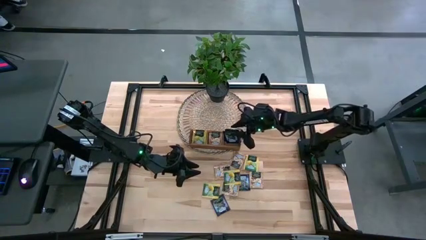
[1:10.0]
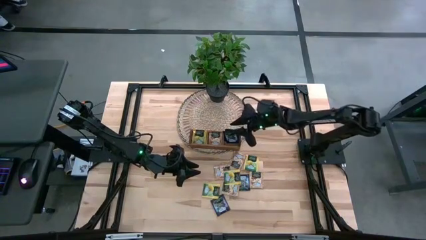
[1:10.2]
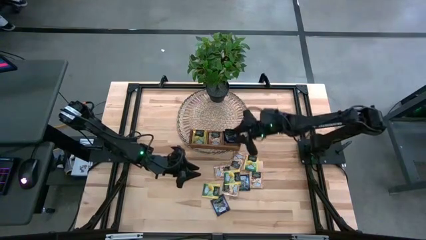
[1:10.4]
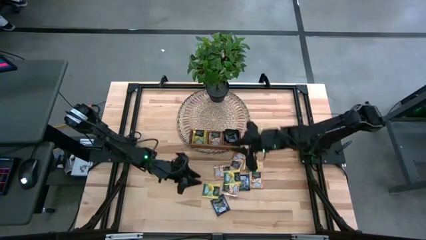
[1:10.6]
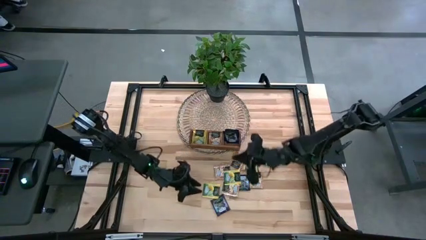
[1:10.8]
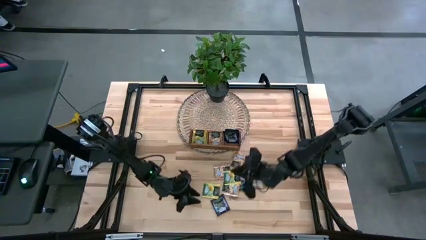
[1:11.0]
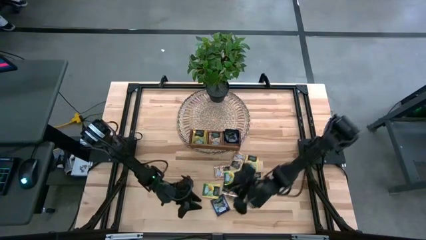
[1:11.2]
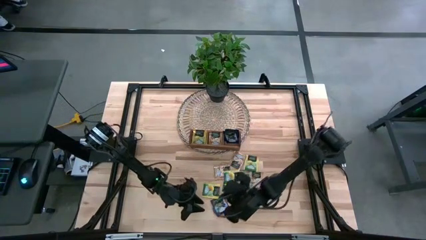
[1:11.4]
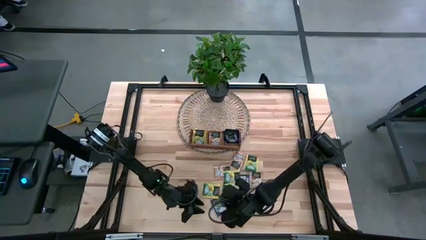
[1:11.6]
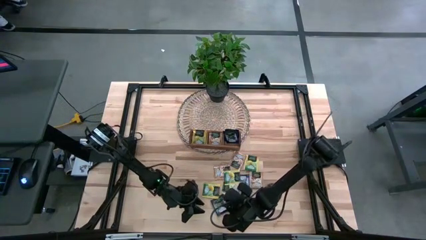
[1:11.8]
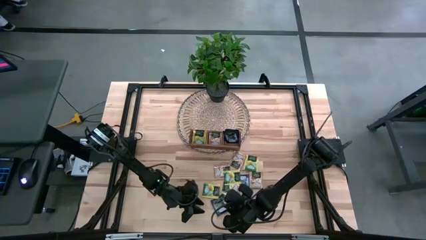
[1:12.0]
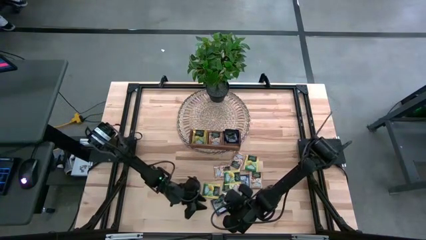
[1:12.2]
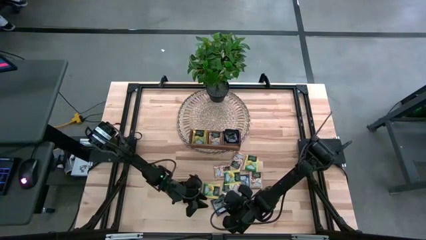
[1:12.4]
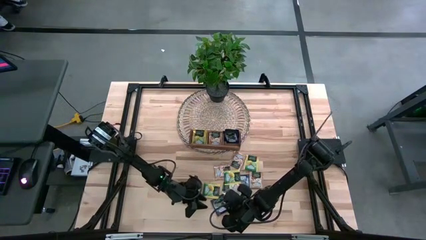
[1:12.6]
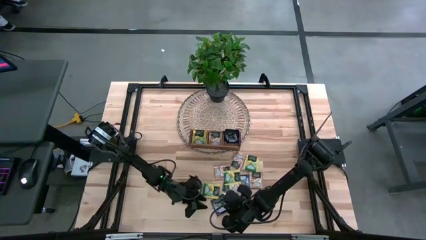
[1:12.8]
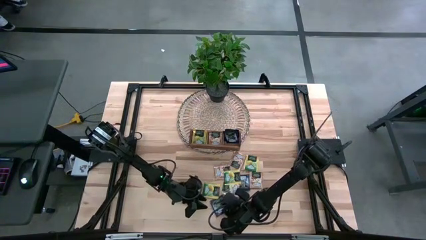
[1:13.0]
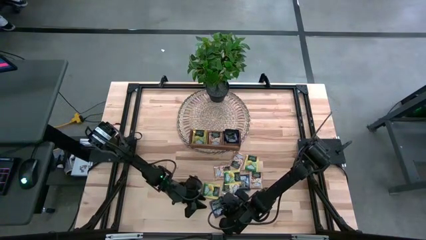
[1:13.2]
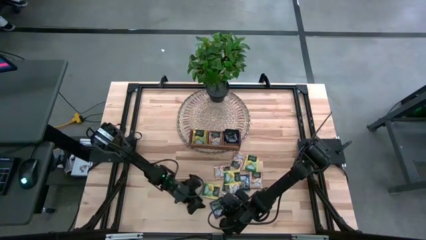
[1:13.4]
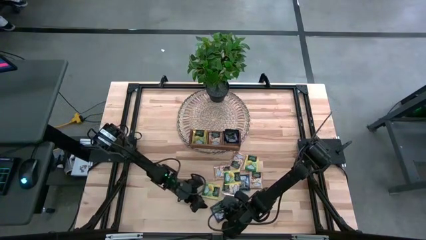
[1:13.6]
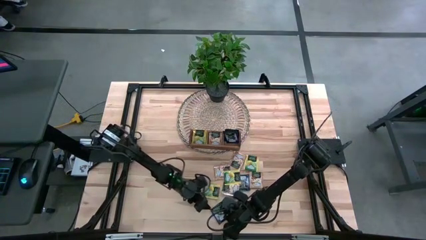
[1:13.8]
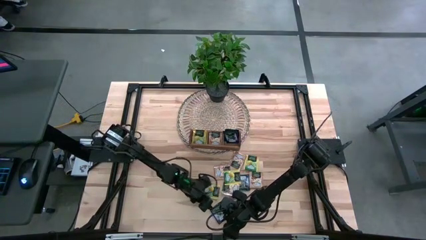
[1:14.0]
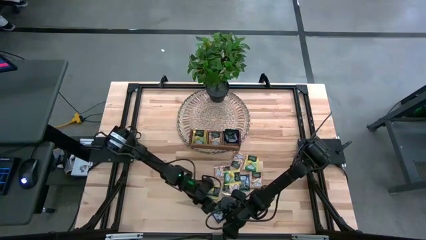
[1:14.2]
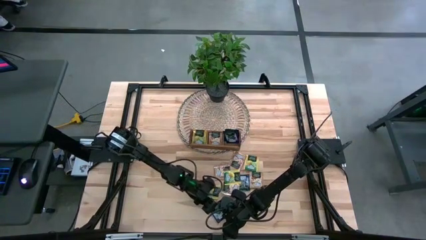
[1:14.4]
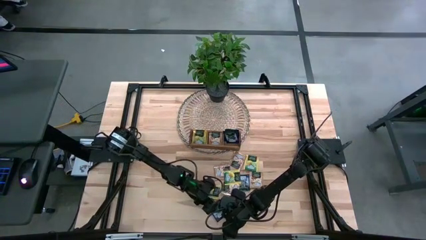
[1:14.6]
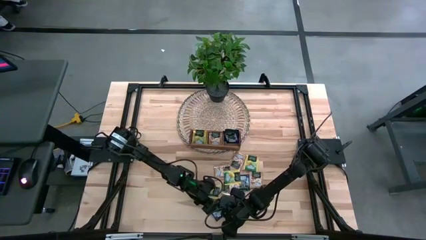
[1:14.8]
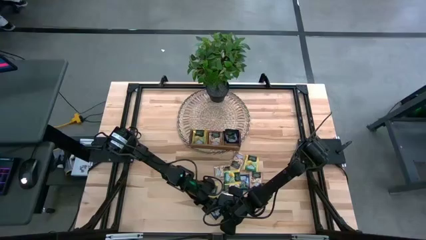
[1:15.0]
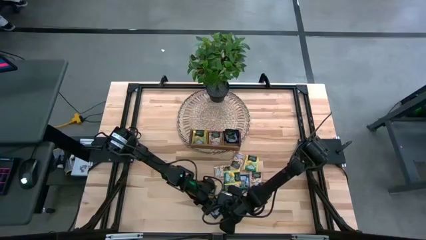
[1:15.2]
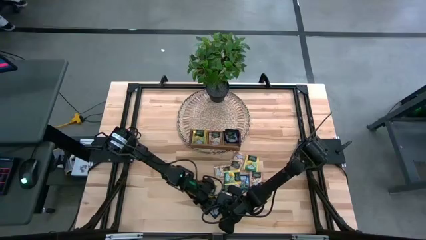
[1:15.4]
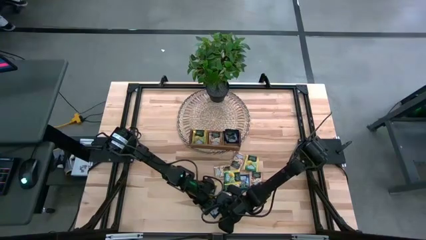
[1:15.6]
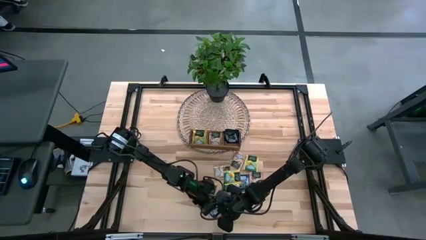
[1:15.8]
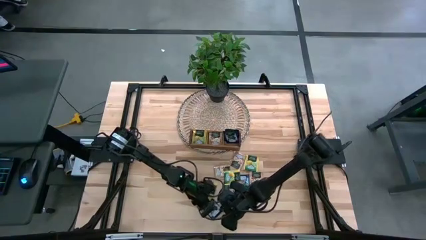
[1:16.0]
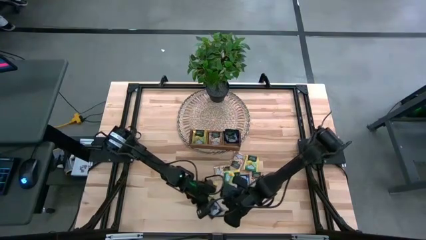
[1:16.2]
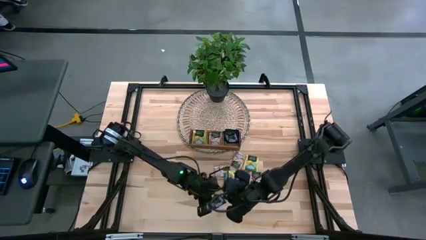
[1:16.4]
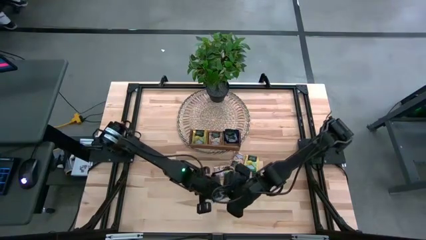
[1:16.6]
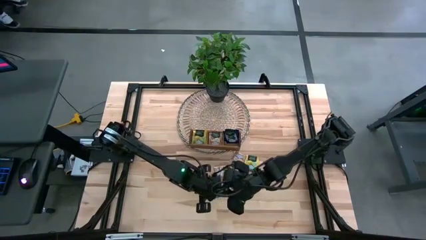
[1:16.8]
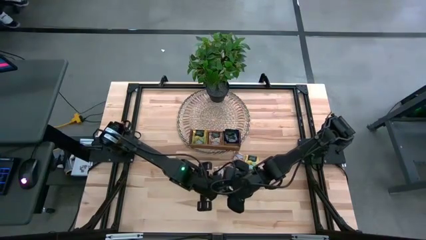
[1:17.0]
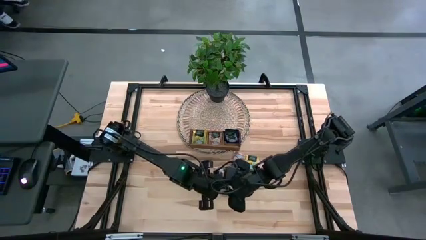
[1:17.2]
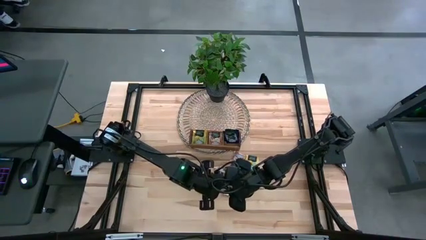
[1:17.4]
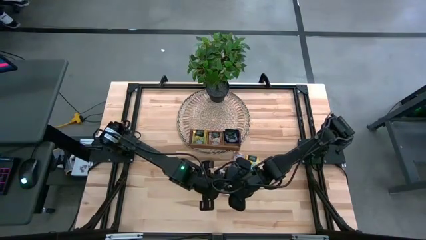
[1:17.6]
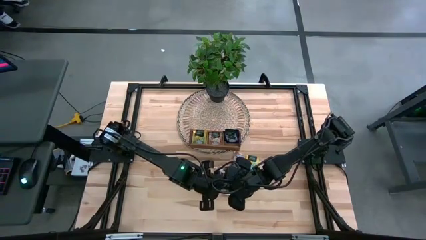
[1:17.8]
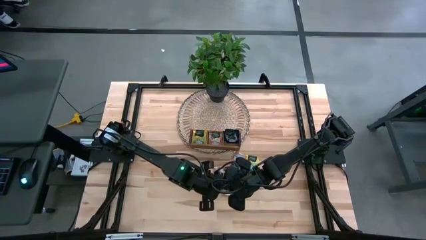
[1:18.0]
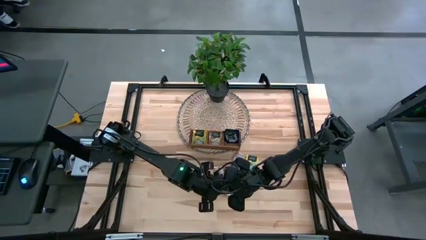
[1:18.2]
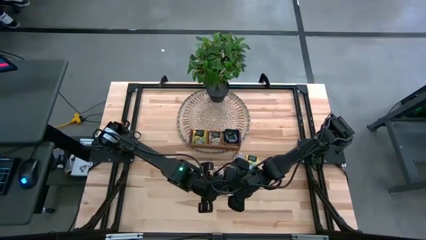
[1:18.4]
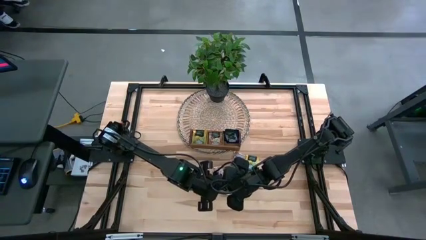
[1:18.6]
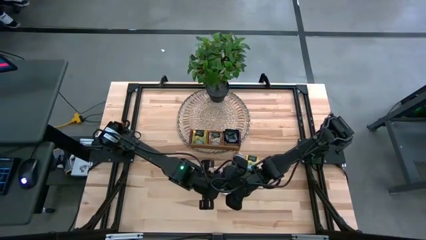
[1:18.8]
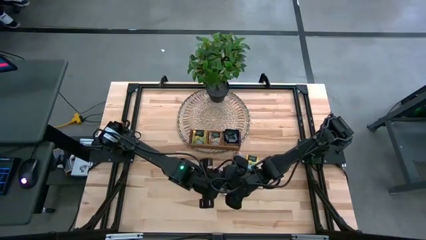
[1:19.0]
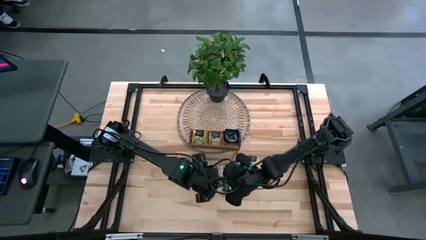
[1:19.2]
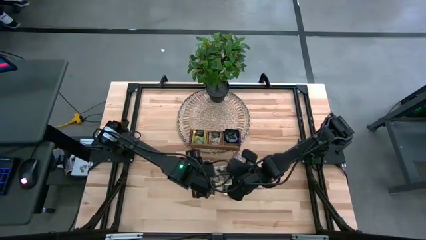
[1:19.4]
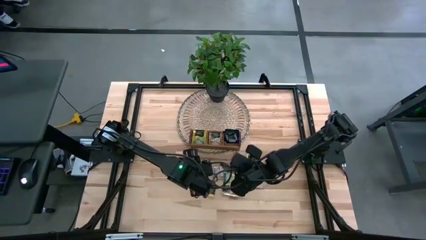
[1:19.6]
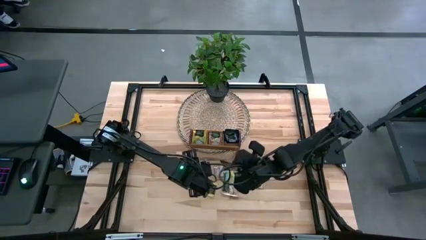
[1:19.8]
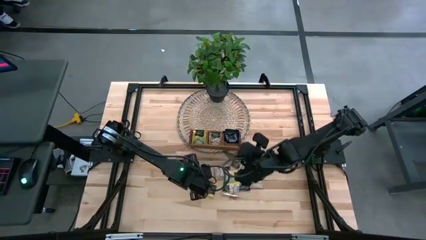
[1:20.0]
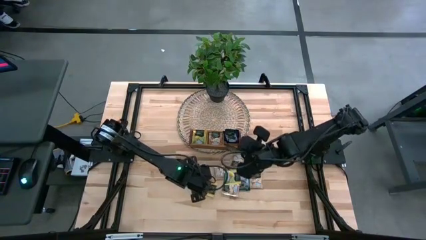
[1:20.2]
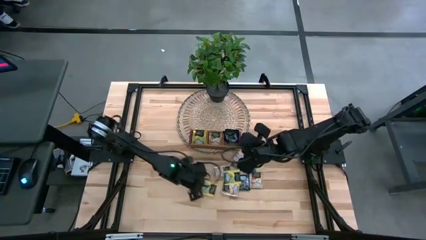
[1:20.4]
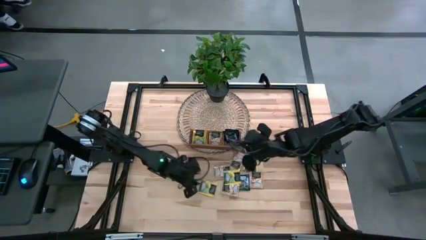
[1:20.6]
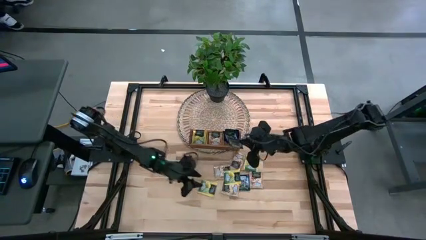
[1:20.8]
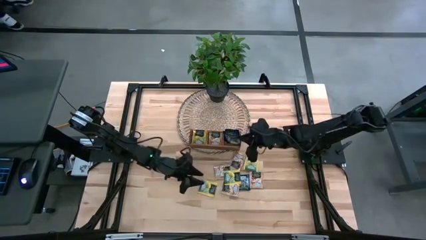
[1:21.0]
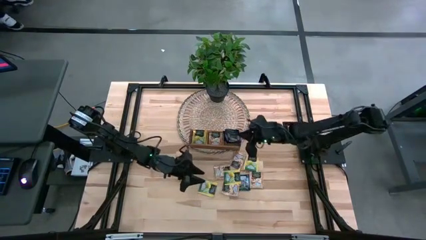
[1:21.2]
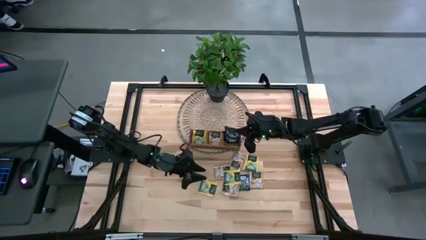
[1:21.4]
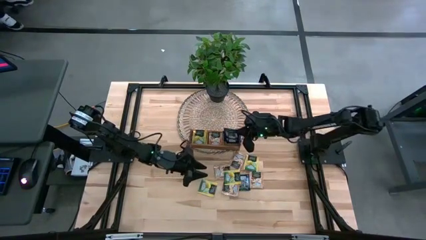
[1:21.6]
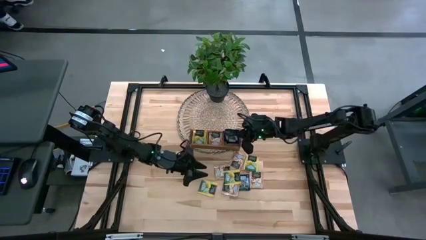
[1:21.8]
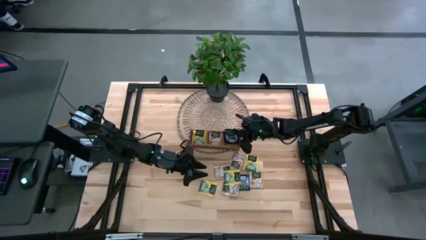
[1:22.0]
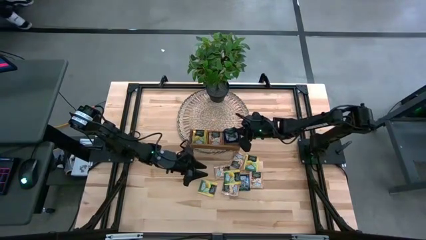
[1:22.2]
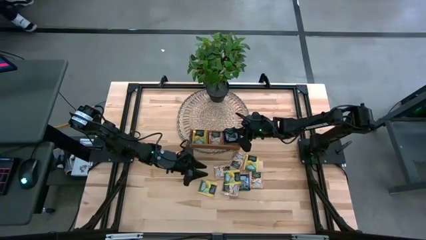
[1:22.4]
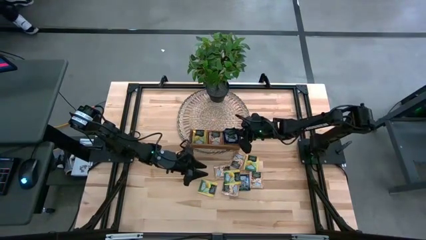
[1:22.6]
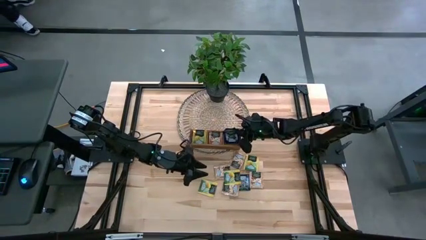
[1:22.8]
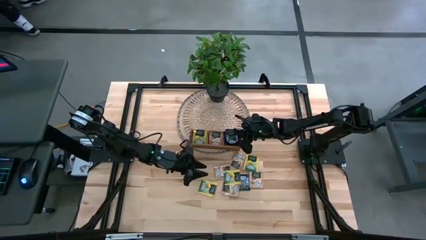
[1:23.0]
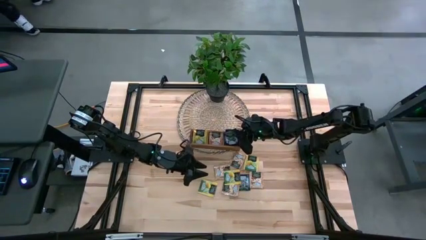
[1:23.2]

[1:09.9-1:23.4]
Task: Pick & Place Tea
Put the violet tea bag into the right section of the wooden organizer

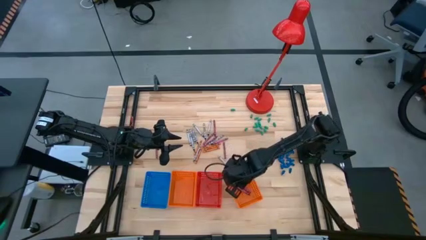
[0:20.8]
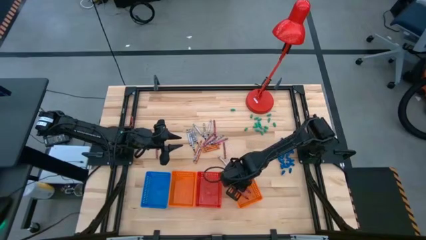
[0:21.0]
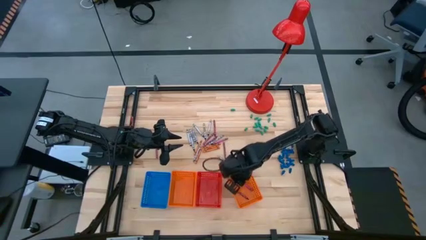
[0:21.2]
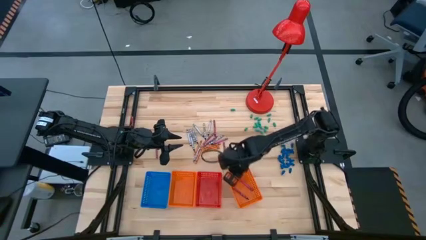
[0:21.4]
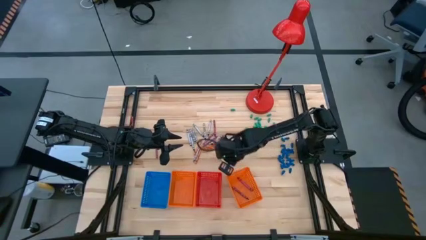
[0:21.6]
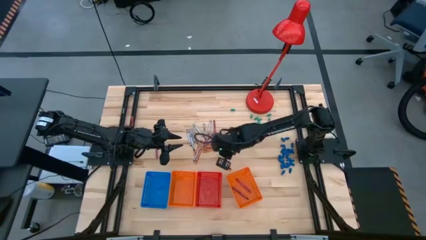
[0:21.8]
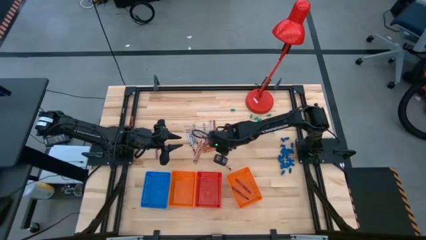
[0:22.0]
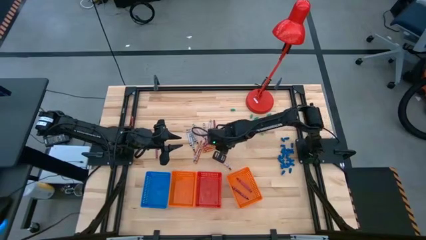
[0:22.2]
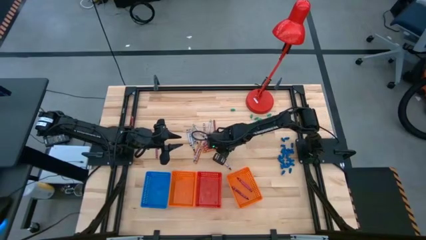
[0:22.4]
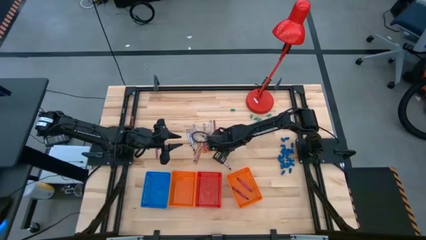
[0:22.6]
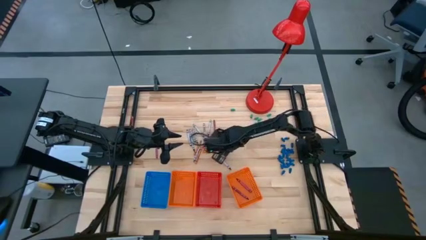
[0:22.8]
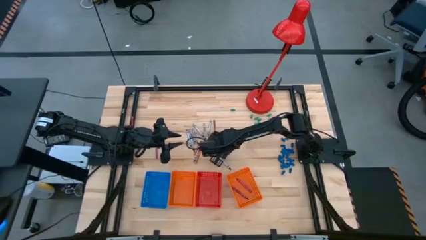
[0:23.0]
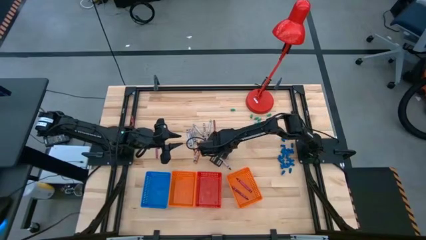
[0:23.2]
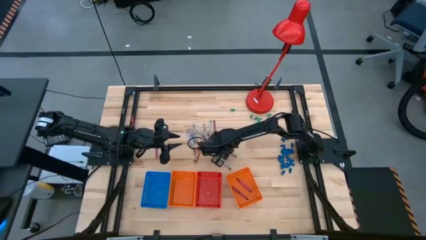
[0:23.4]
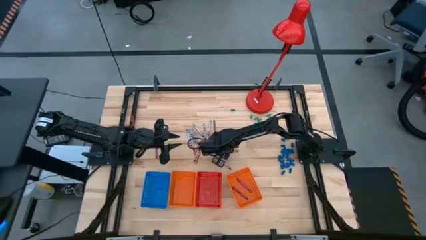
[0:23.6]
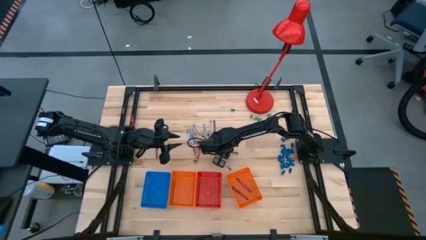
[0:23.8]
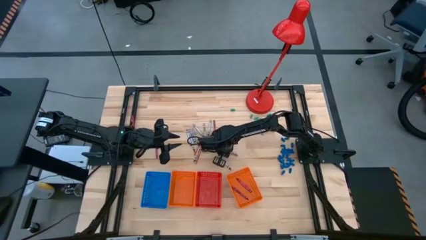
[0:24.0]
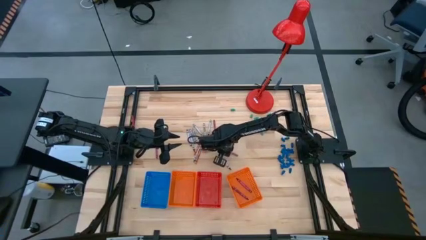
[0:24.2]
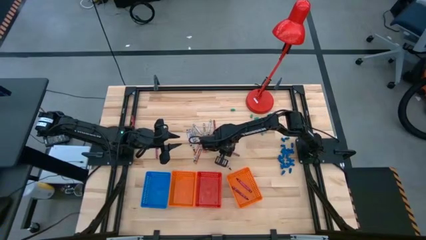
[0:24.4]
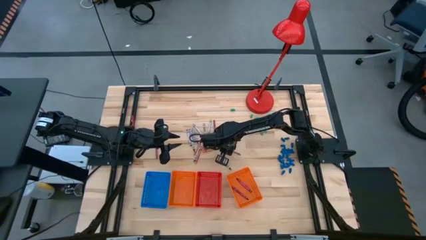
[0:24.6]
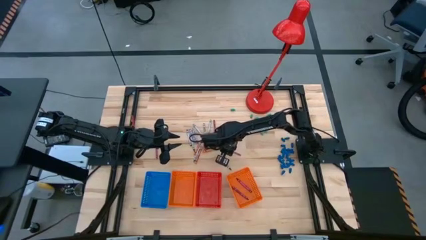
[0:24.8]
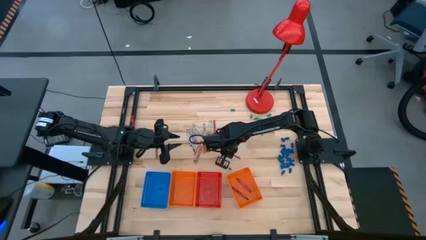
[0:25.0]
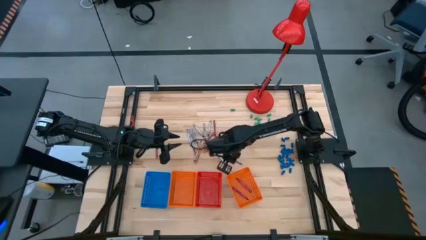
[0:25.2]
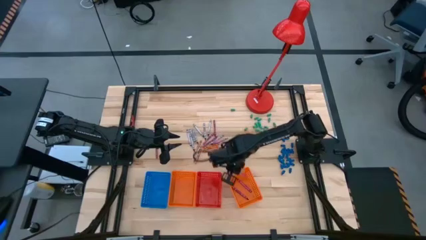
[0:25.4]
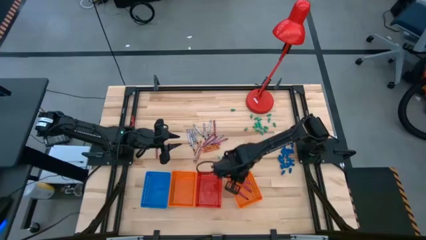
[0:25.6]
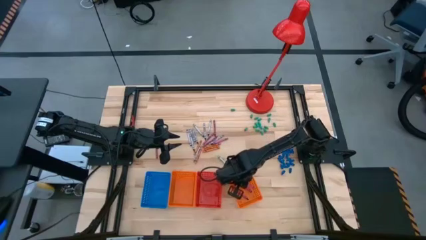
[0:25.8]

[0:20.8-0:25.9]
Task: Sort crayons
Put the red crayon into the right orange bin
